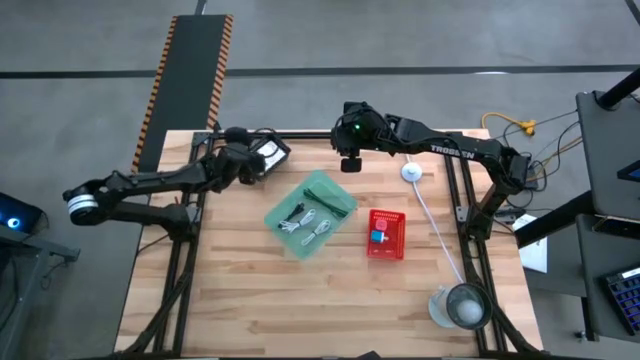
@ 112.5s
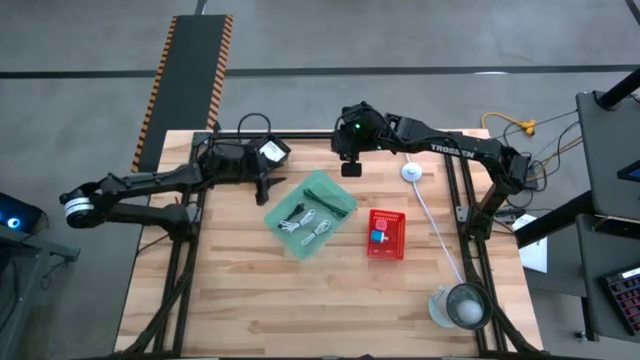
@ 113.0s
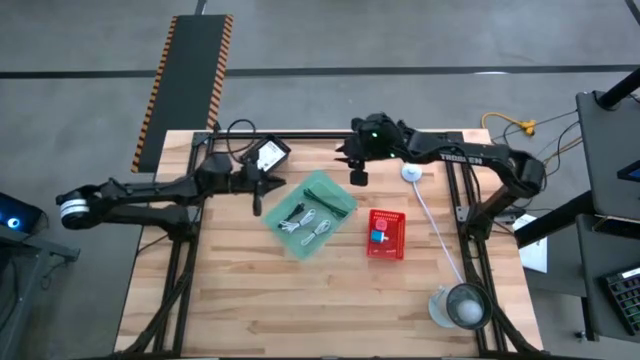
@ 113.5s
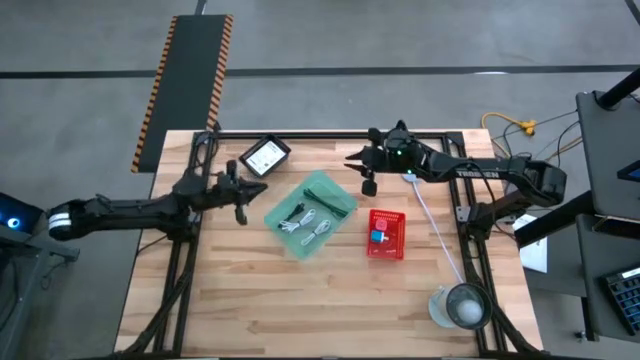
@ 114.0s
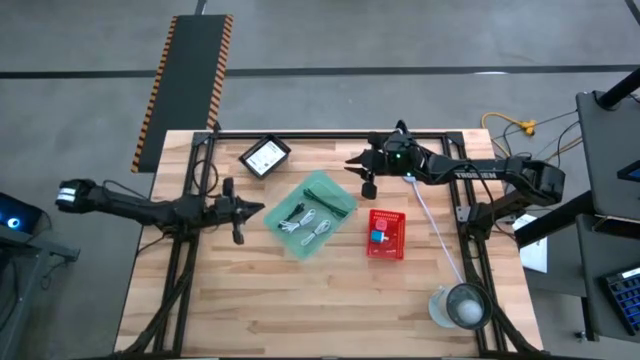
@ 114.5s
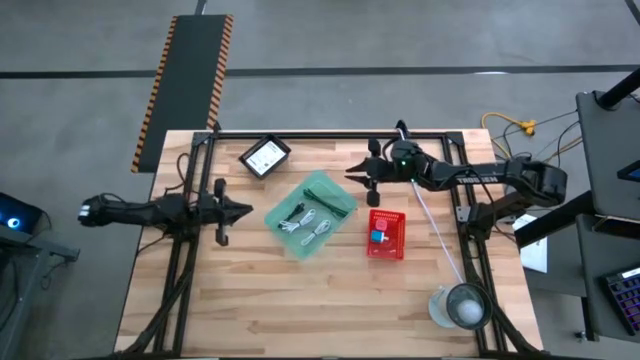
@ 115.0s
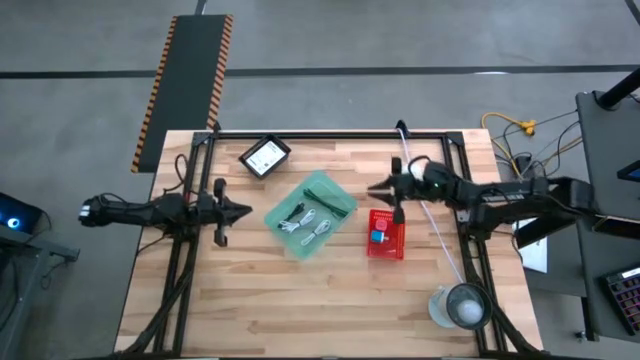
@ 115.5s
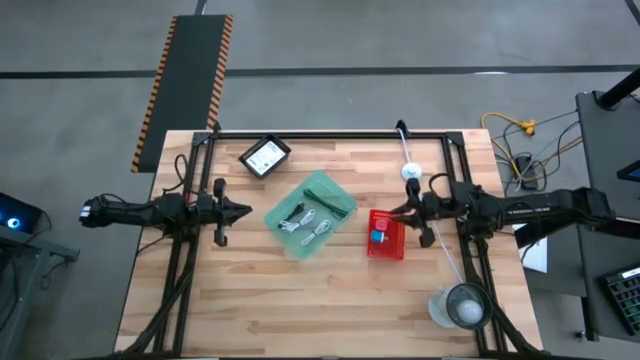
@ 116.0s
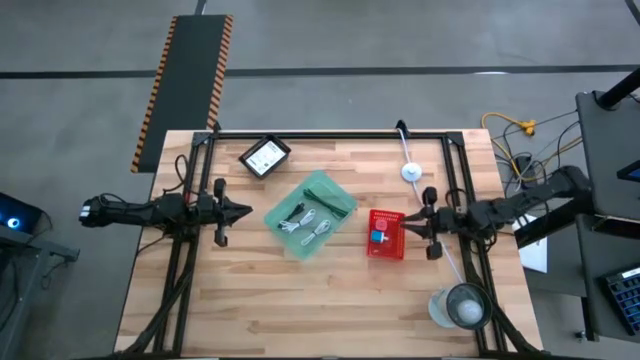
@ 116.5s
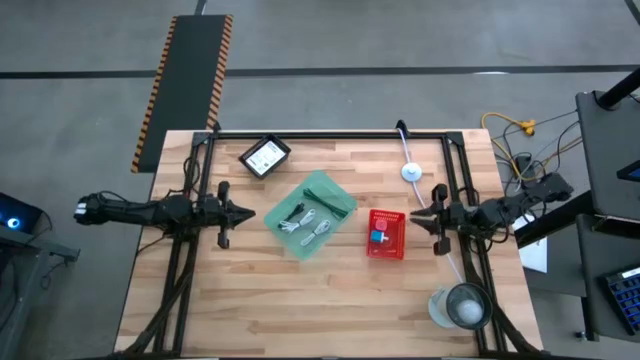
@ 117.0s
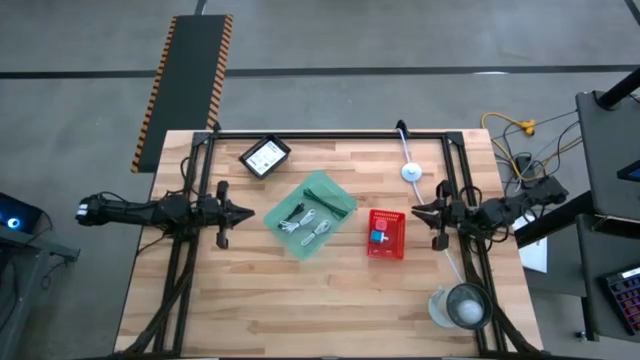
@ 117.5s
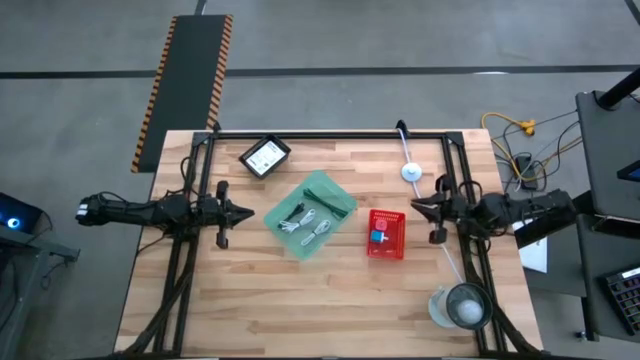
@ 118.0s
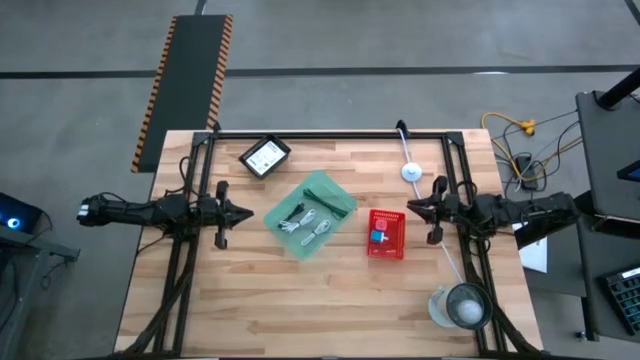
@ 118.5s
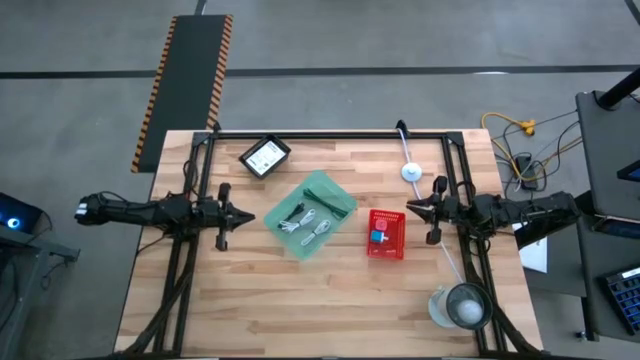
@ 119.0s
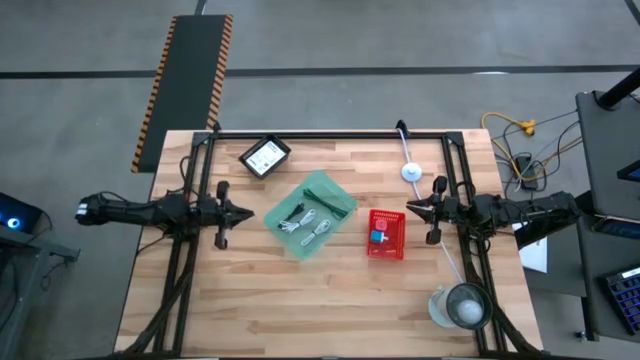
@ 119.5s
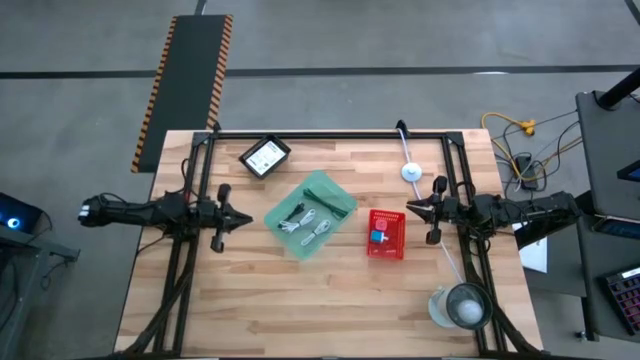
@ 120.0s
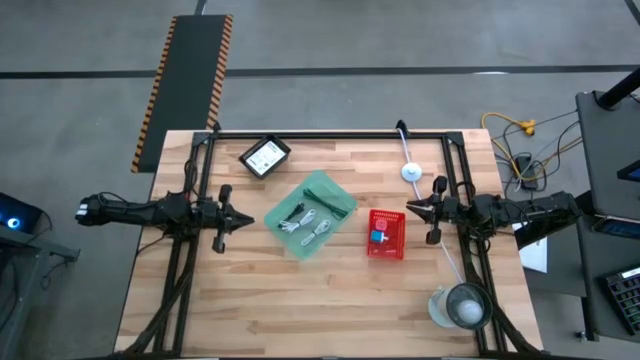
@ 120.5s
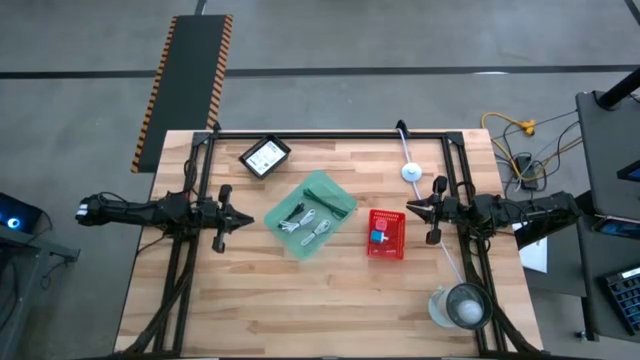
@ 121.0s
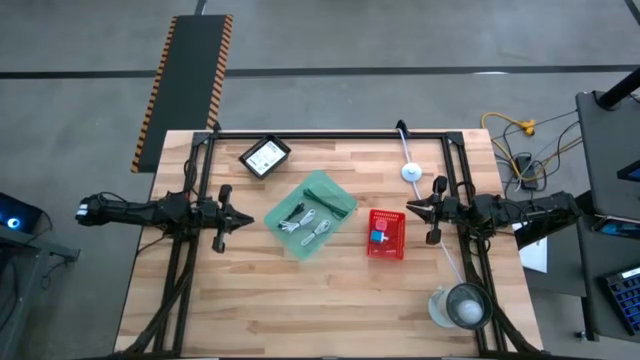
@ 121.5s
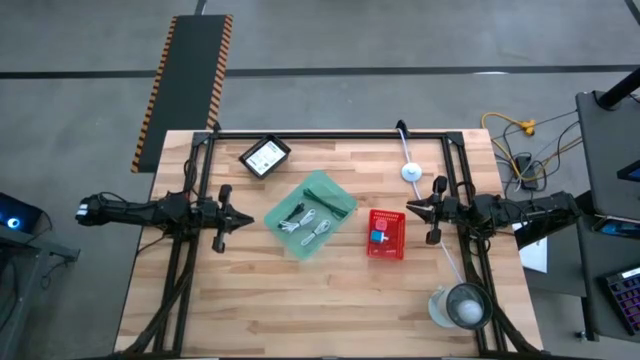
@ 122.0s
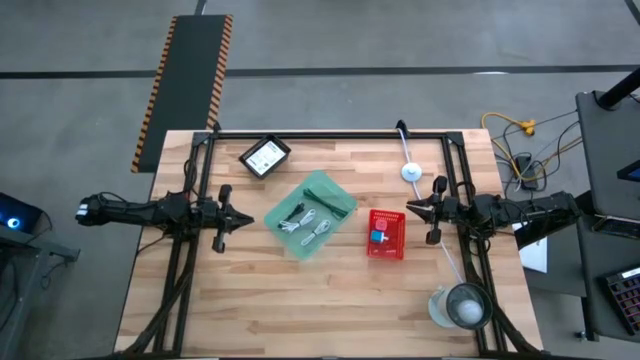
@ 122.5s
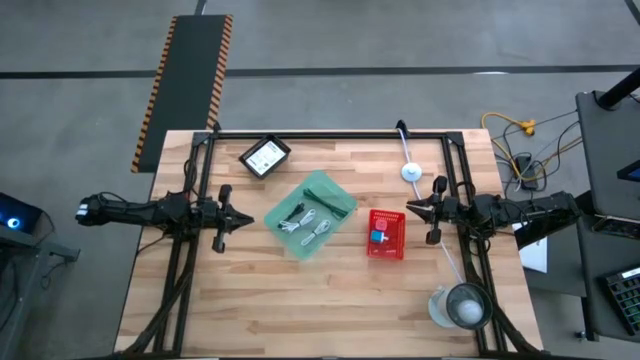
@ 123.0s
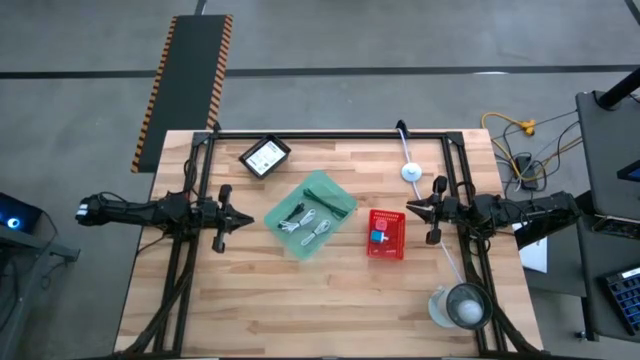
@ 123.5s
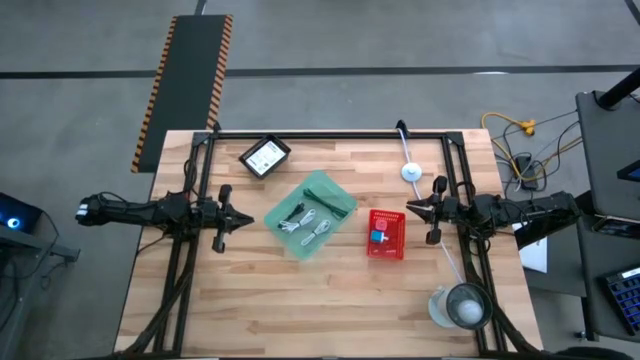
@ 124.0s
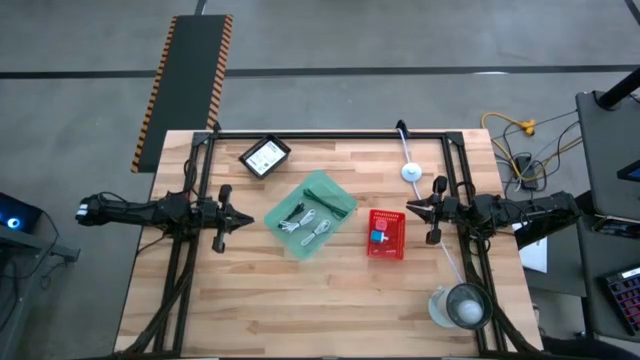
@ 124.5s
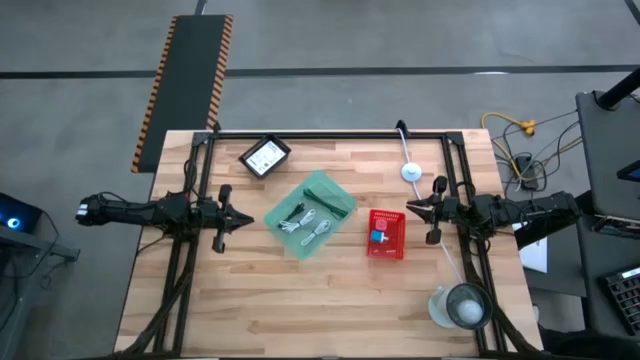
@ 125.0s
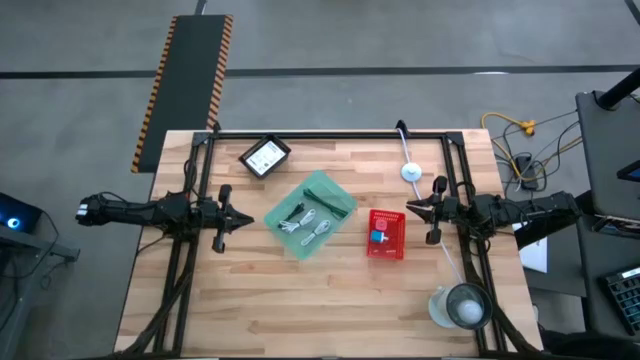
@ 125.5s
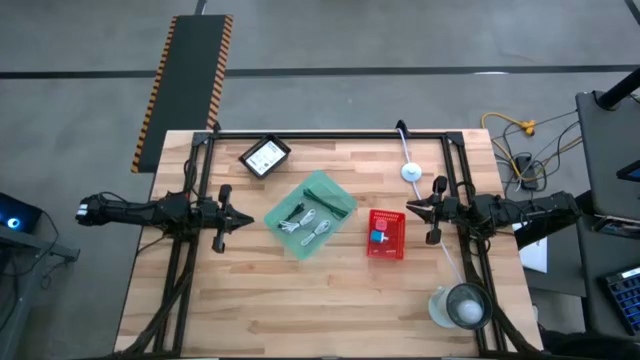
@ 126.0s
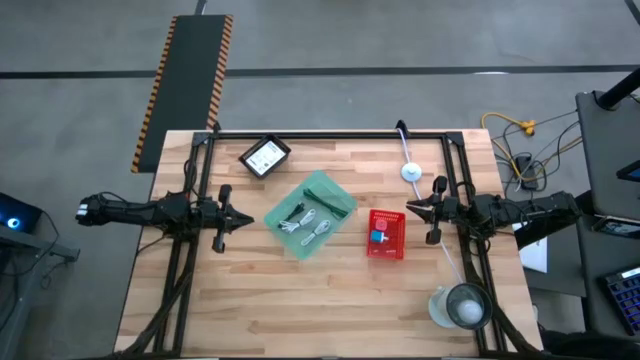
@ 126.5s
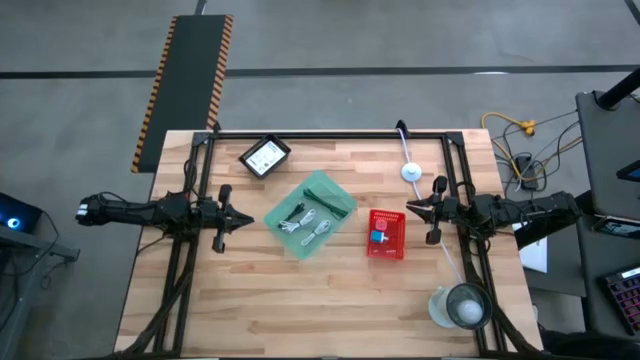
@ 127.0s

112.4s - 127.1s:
Task: Pick and place items into bin
Return to Home Position

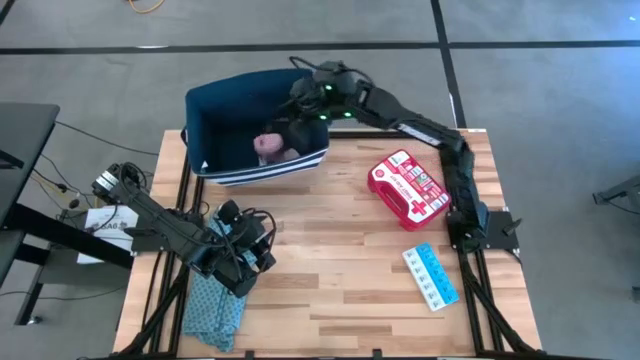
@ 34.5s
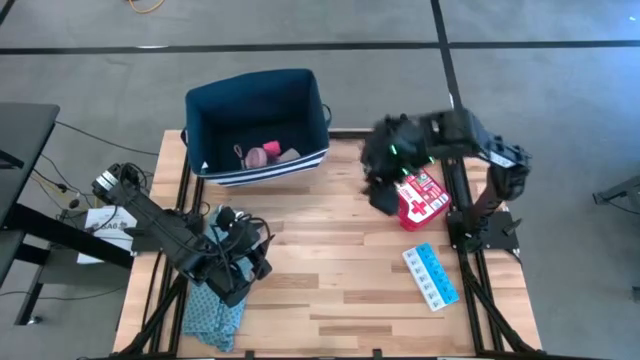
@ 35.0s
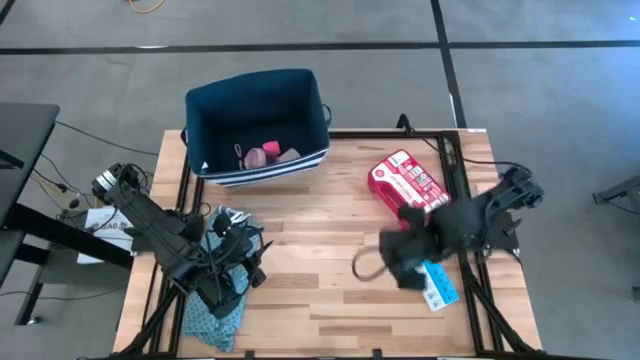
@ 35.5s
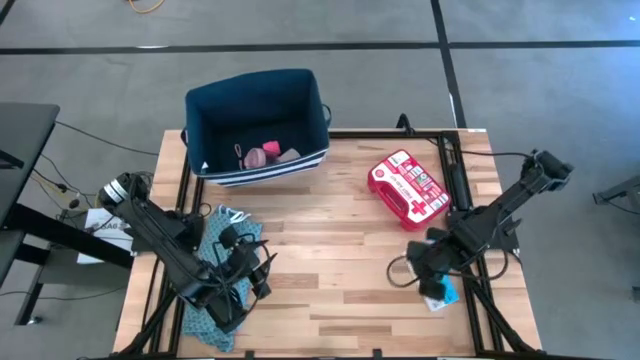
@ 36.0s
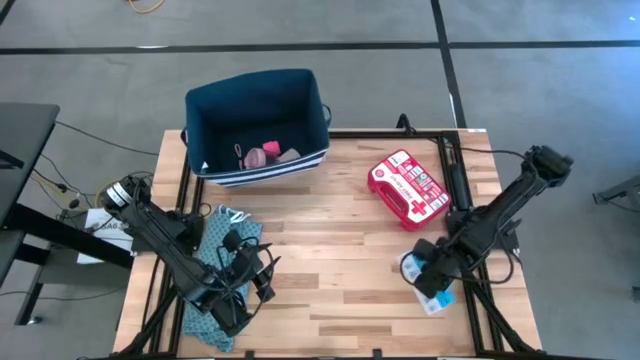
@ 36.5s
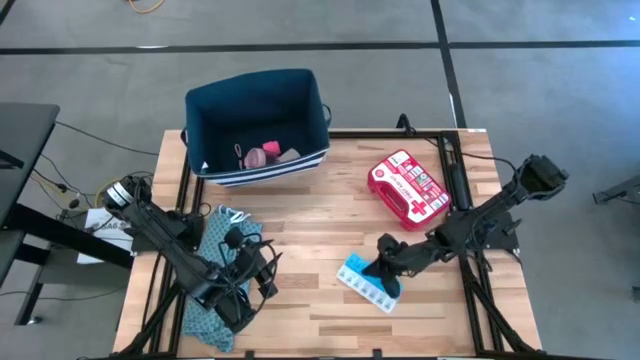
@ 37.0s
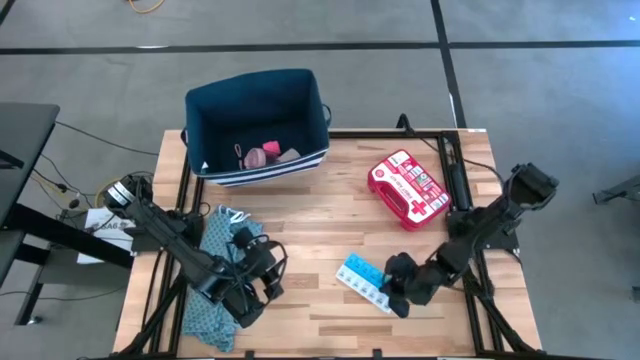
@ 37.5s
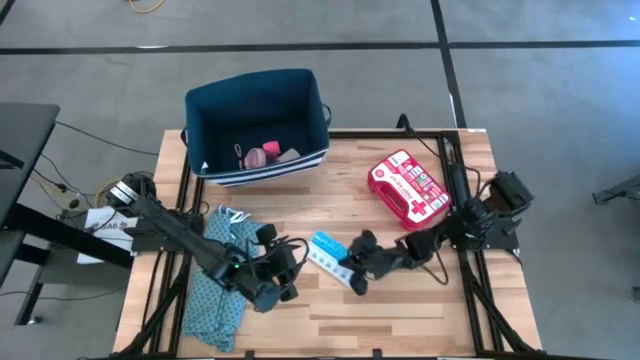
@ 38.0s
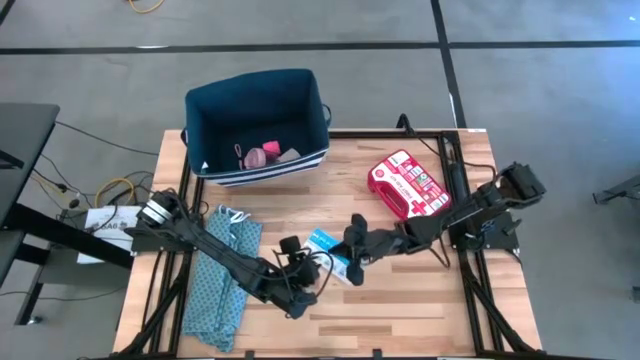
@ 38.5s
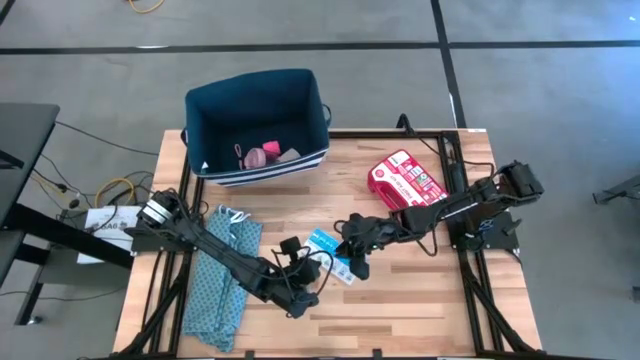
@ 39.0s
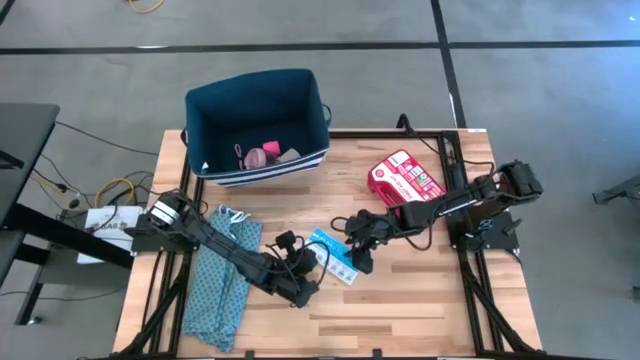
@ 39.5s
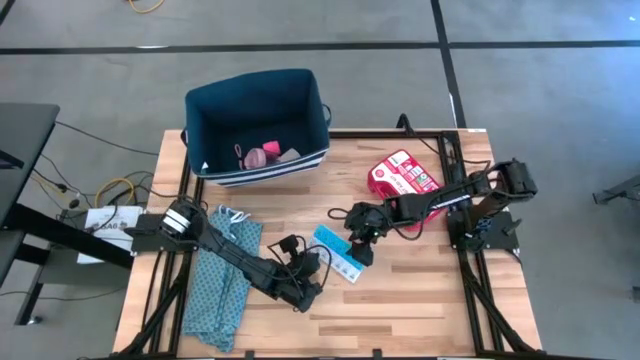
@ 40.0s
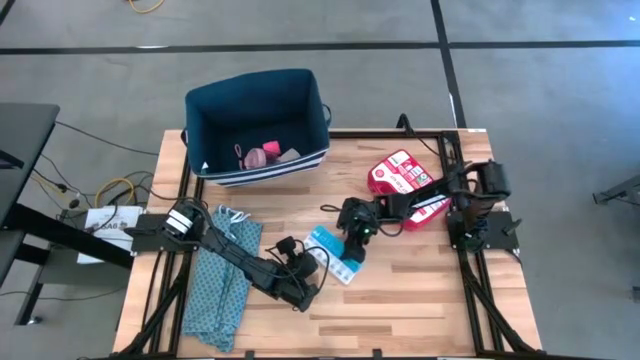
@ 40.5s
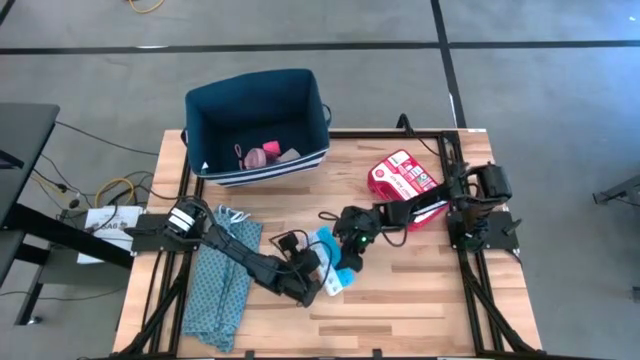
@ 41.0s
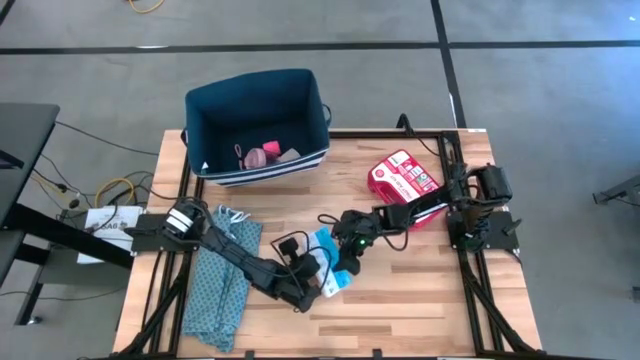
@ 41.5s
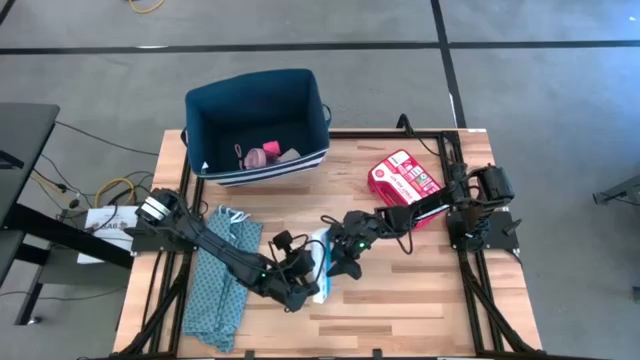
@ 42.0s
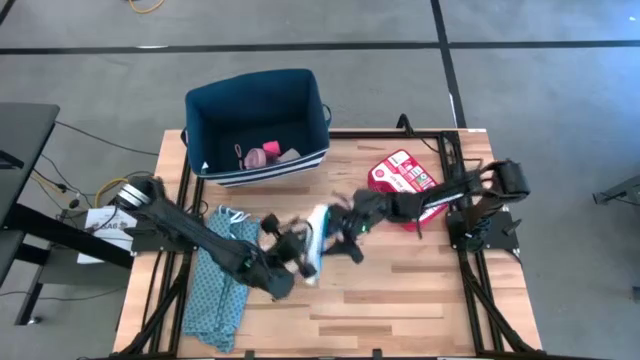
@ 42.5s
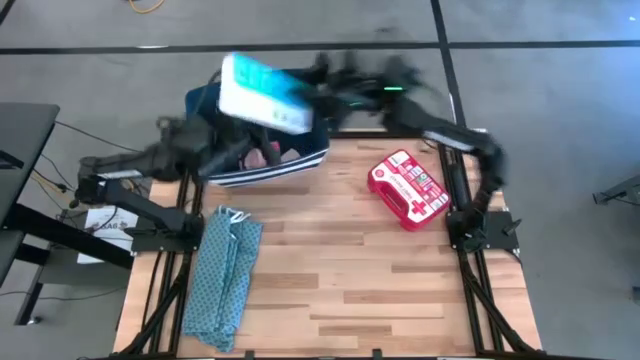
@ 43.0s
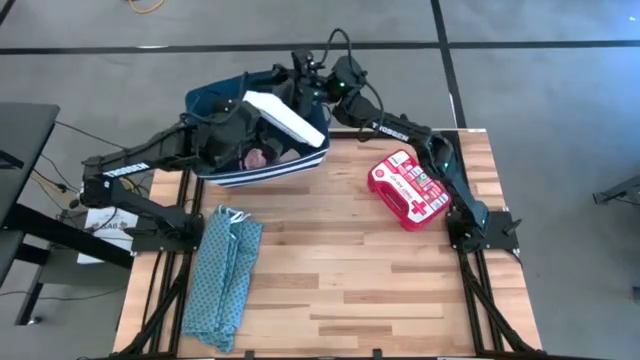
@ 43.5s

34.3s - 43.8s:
Task: Pick & place medical supplies in basket/bin
Put the blue white pill organizer into theblue bin
